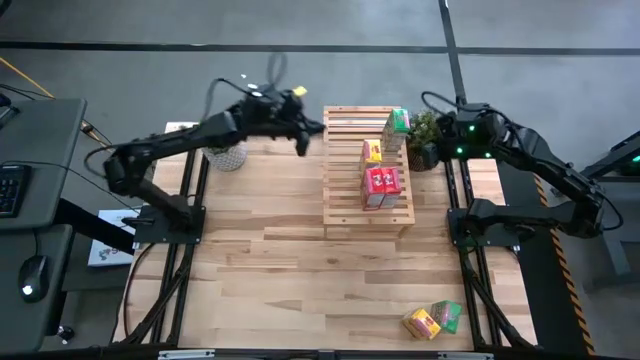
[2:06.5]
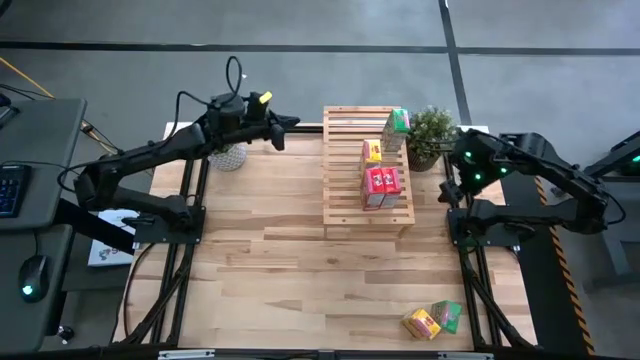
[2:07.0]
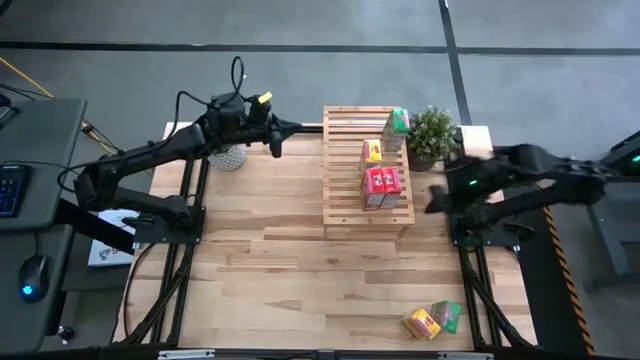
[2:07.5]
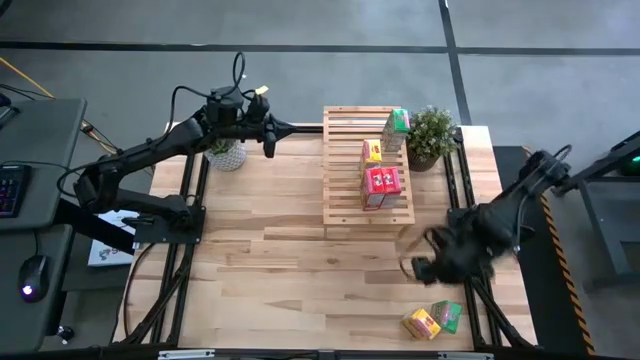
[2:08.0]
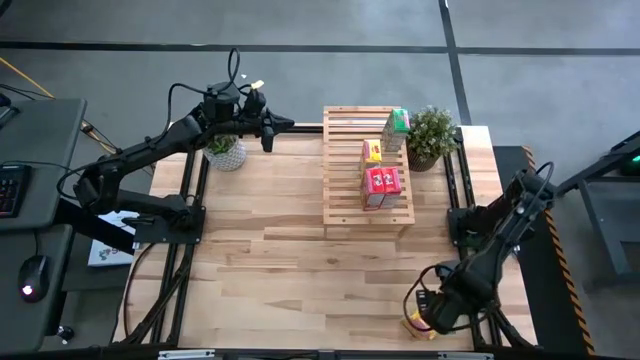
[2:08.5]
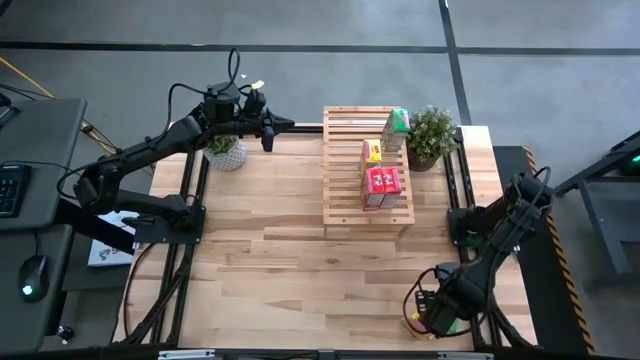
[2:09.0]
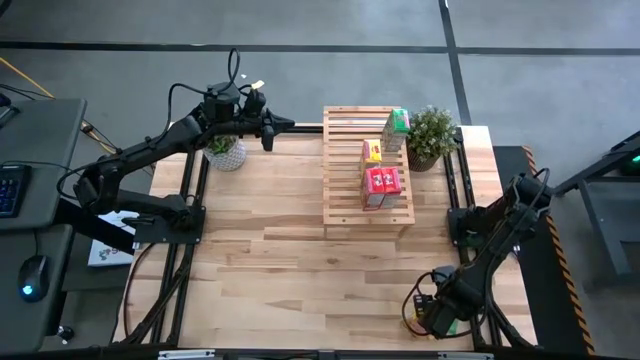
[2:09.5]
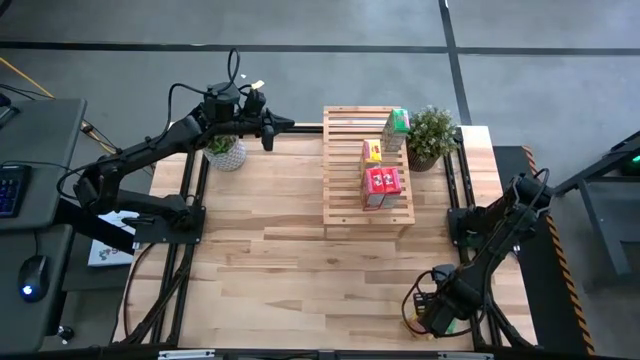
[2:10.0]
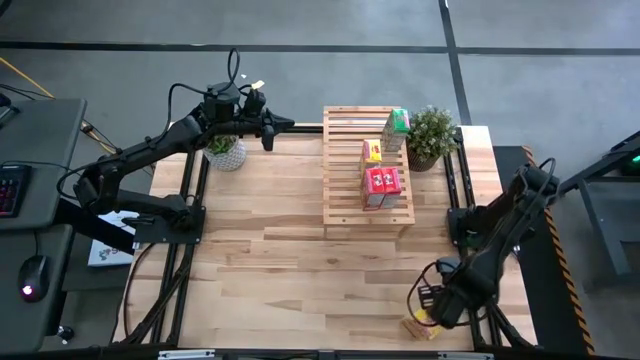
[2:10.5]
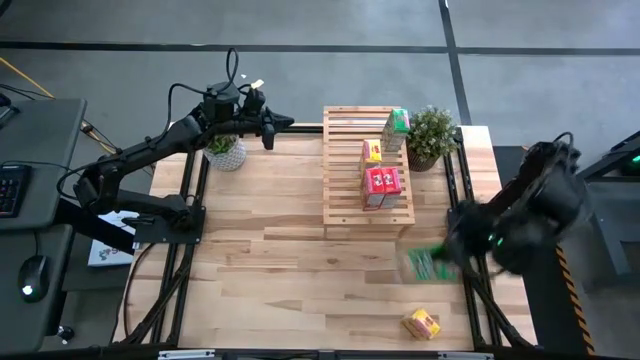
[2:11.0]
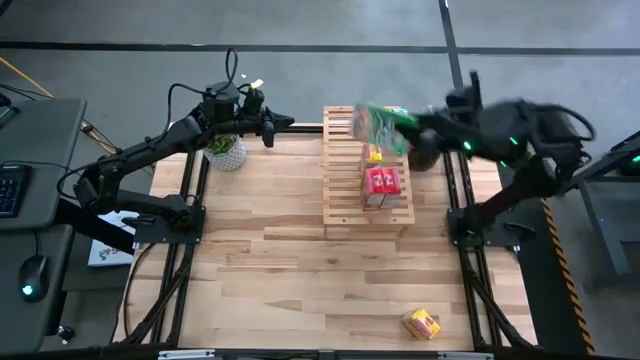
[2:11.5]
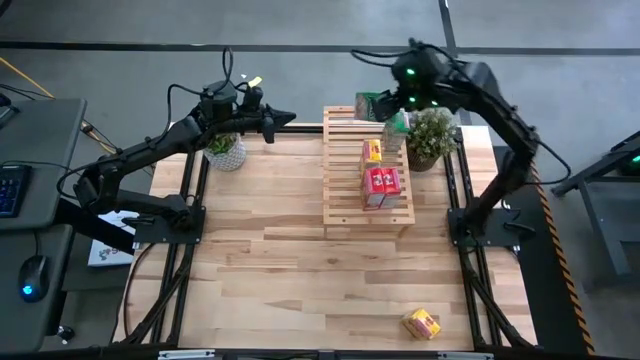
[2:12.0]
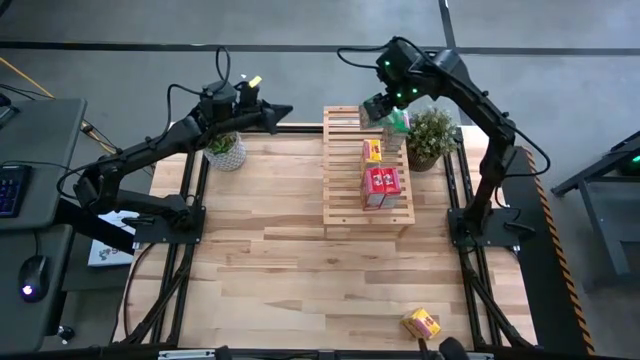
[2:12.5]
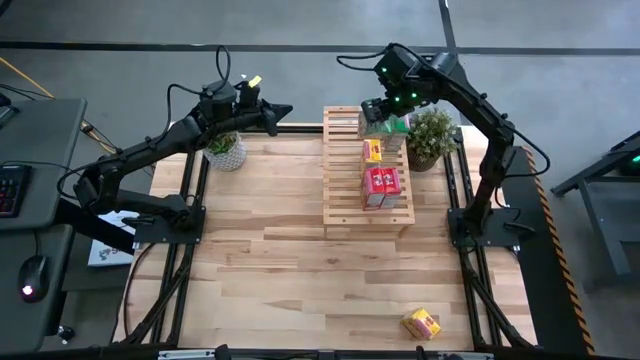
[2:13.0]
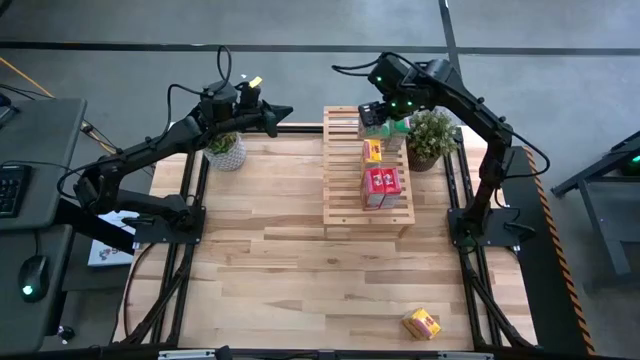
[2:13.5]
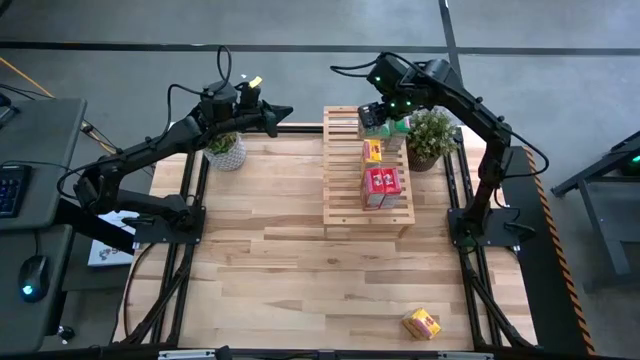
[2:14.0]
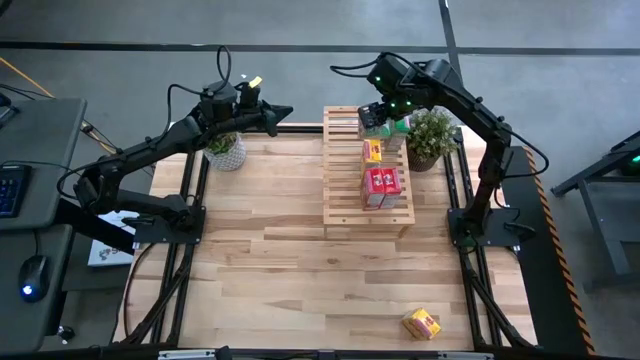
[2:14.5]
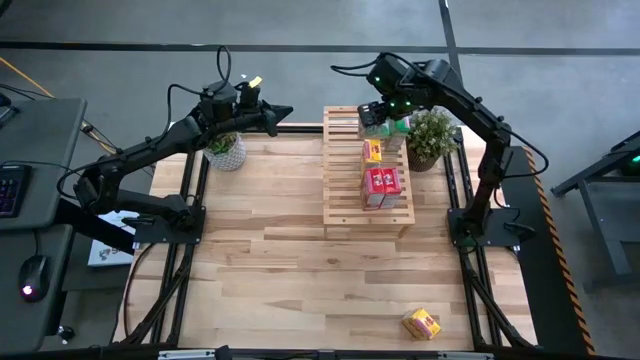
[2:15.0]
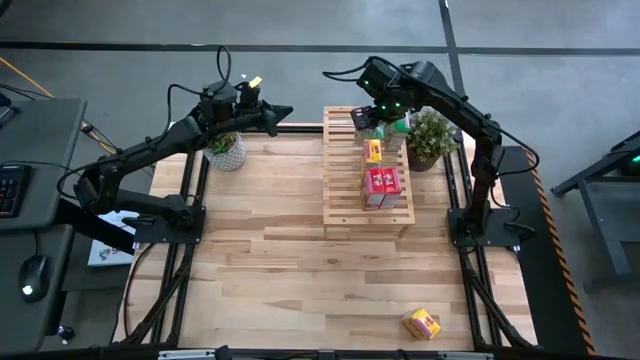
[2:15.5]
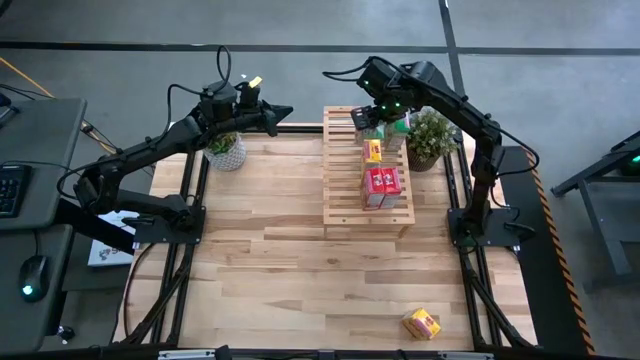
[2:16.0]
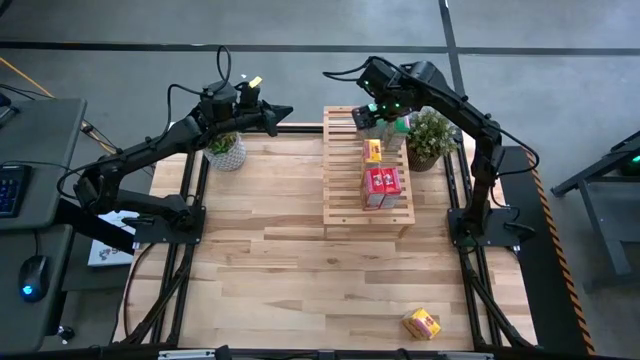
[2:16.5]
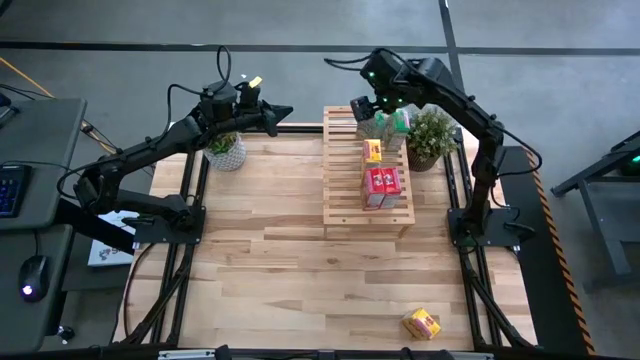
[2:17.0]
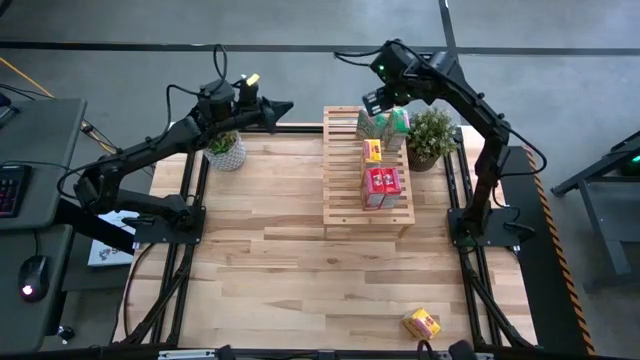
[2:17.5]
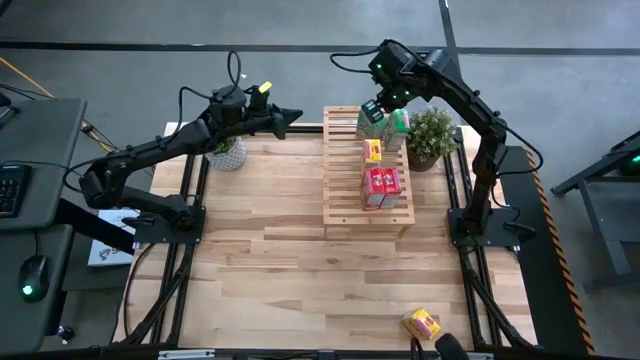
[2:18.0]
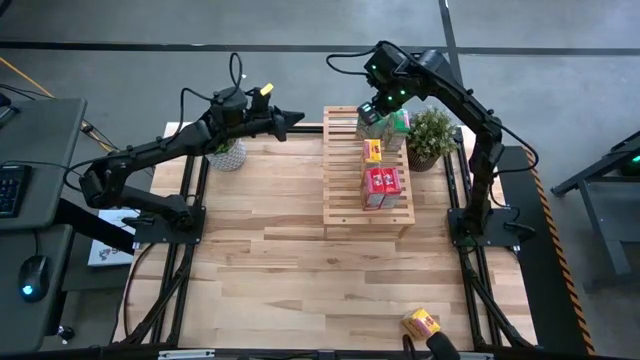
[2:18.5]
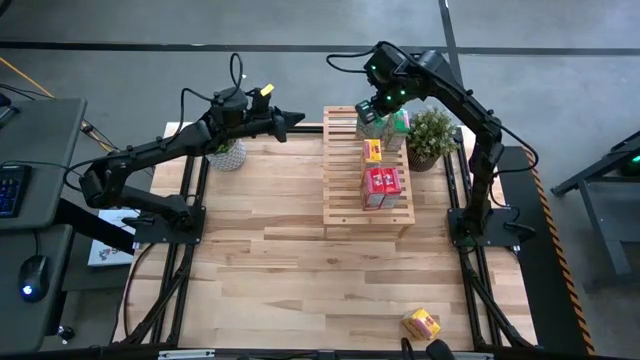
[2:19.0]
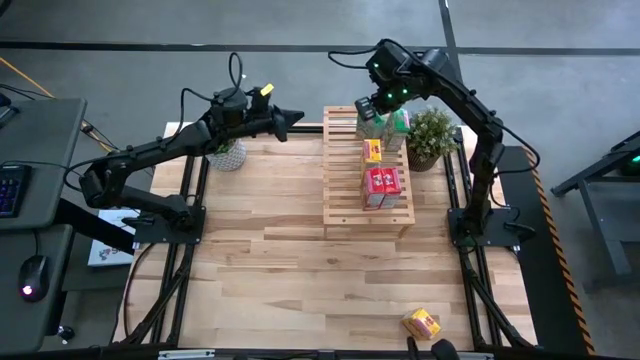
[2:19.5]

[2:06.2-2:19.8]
Task: Stack cereal on shelf
Put the green cereal on the shelf

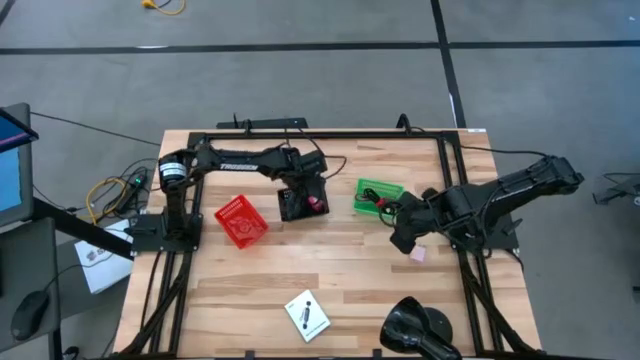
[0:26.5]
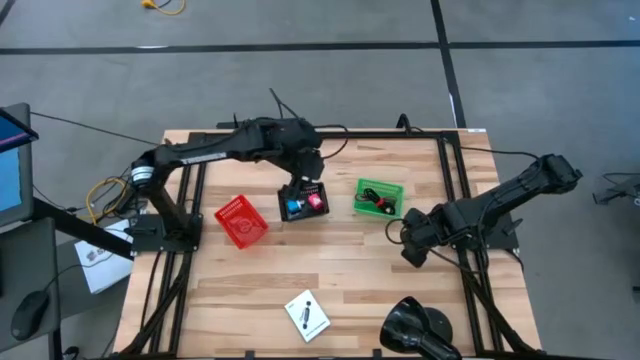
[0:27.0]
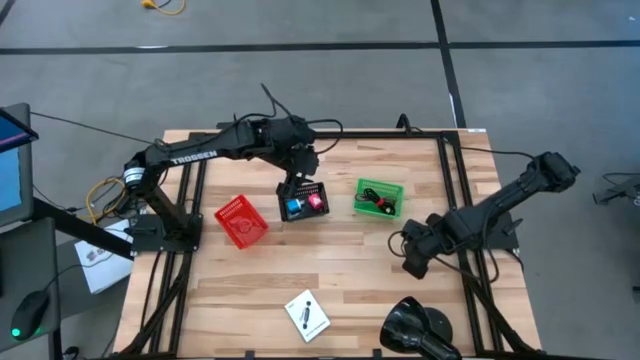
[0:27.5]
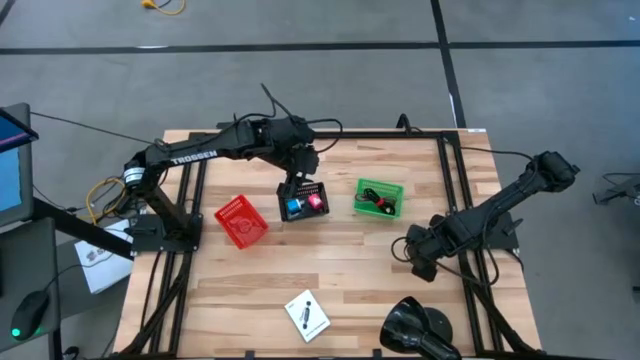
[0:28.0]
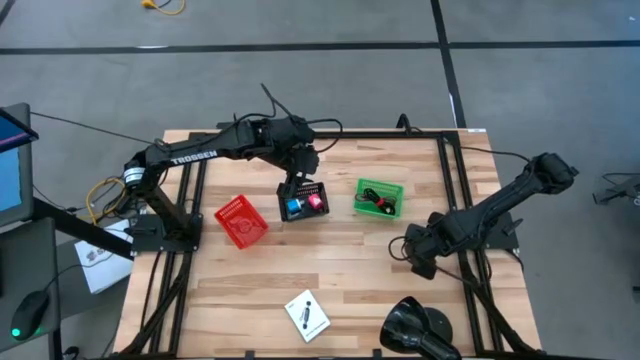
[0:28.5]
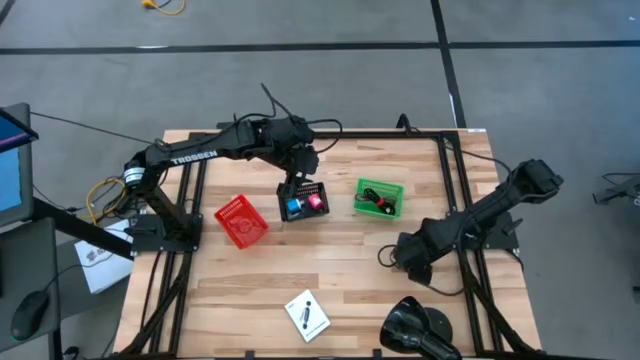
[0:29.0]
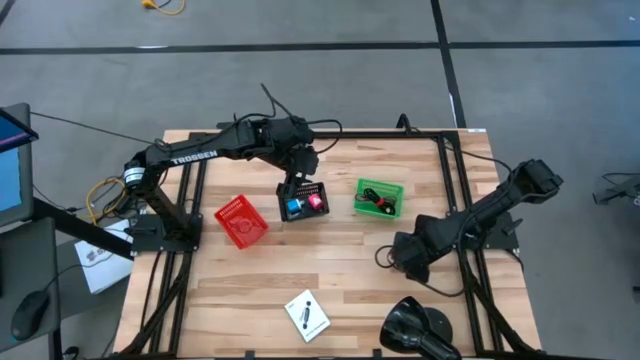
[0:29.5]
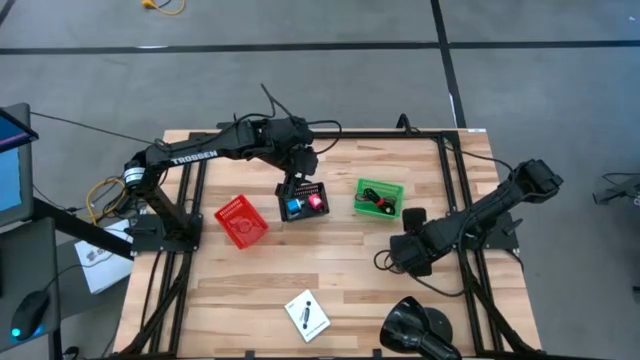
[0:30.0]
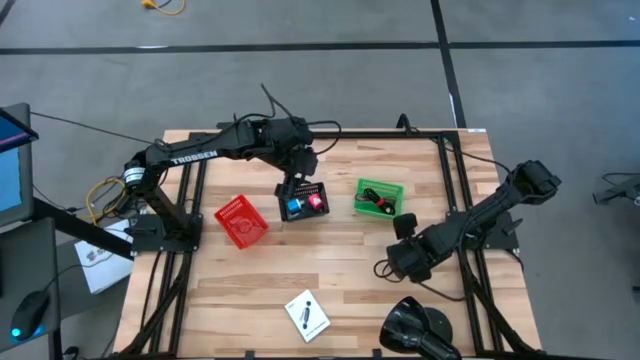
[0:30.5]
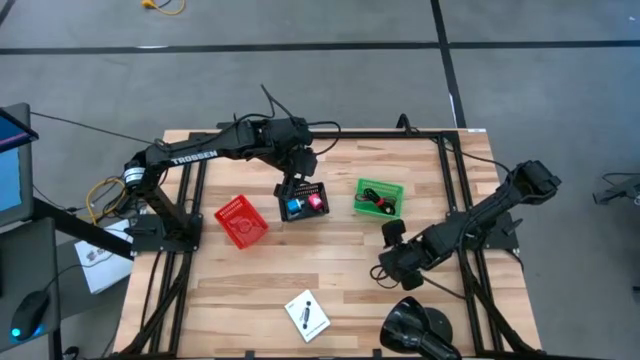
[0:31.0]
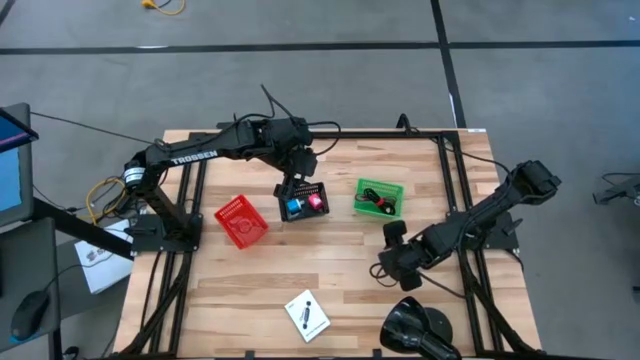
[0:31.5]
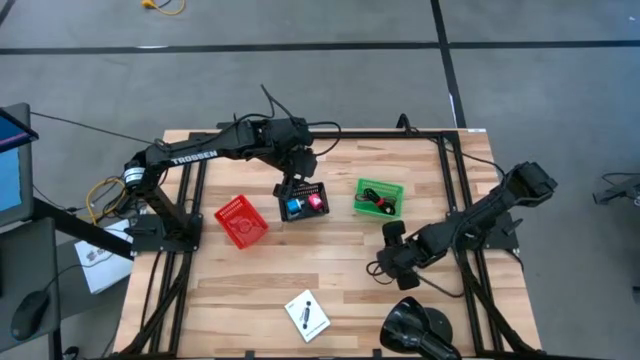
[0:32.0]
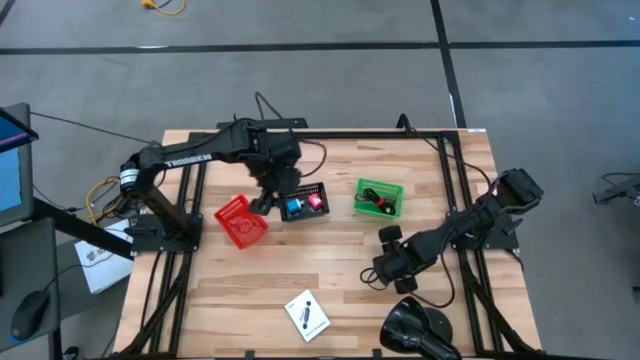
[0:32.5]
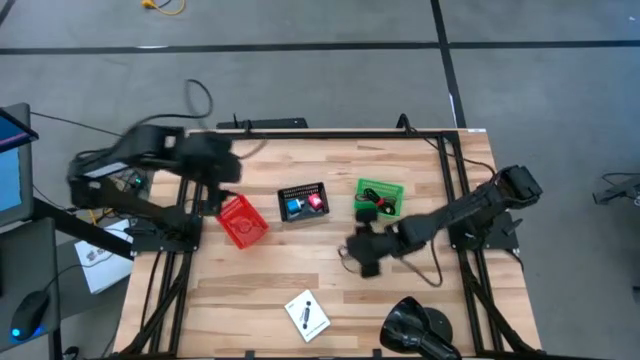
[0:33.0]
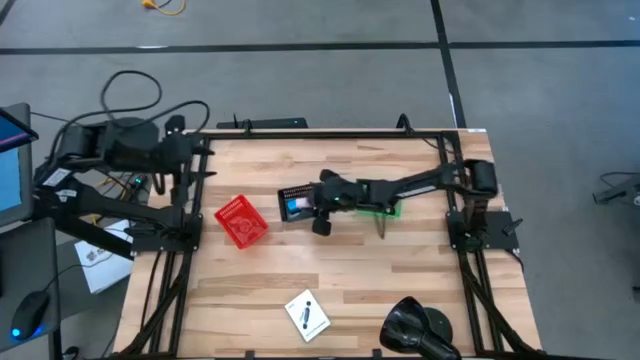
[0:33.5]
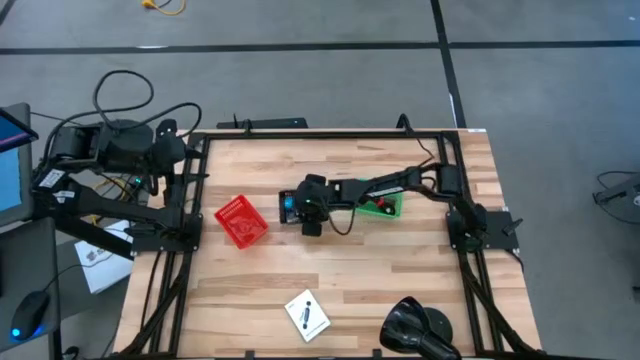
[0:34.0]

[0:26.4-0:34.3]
Task: Pick and place items into bin
Put the light pink charger adapter into the black bin
